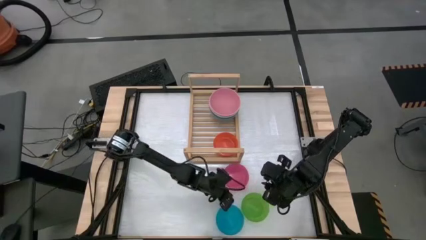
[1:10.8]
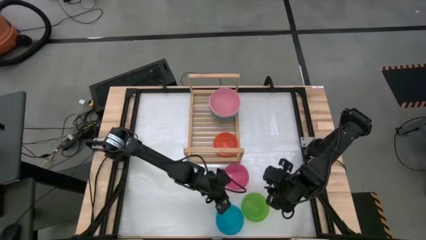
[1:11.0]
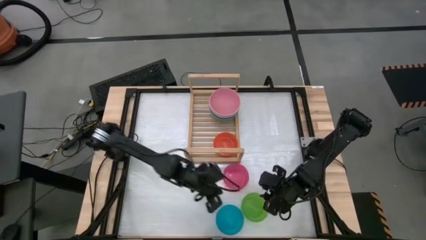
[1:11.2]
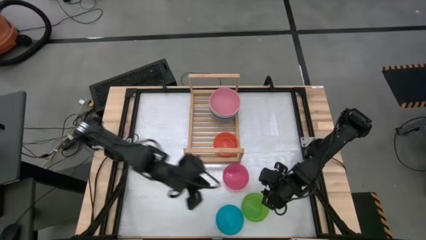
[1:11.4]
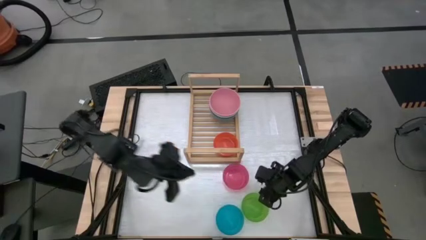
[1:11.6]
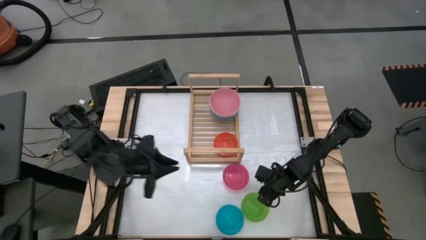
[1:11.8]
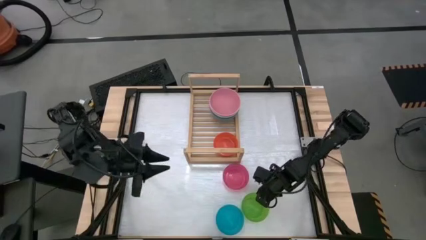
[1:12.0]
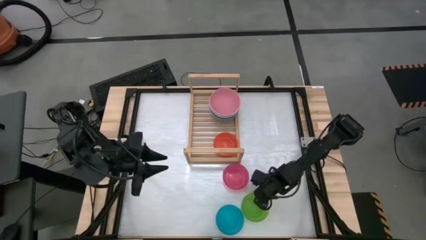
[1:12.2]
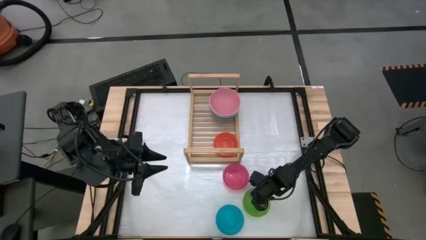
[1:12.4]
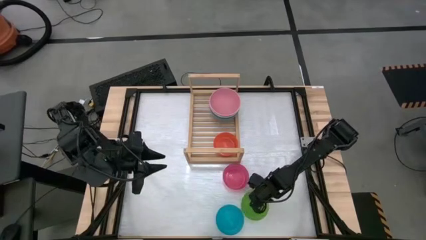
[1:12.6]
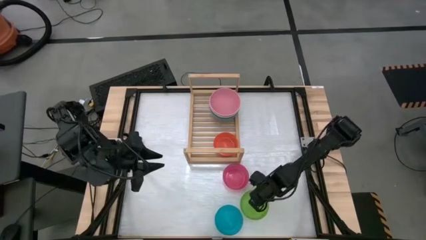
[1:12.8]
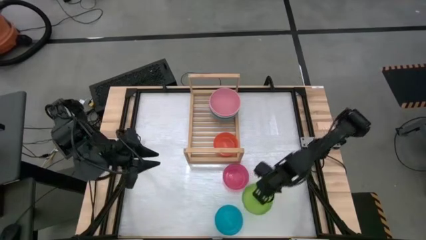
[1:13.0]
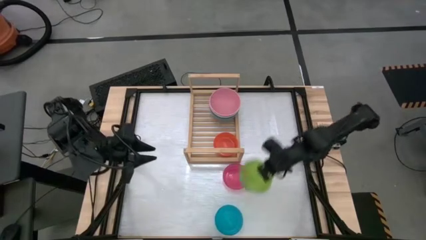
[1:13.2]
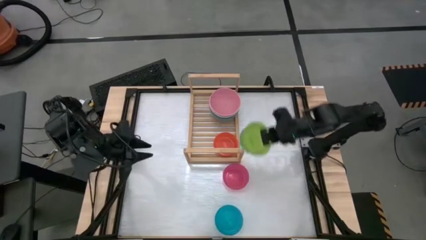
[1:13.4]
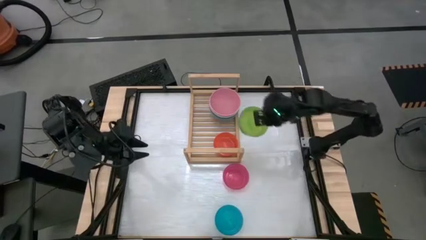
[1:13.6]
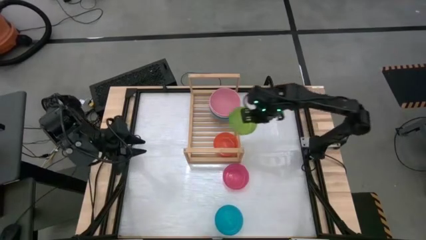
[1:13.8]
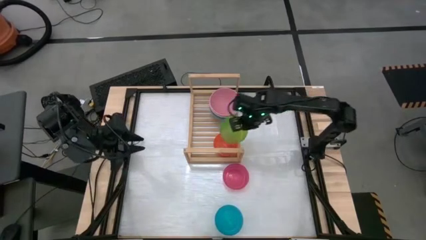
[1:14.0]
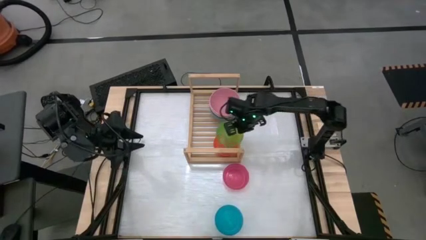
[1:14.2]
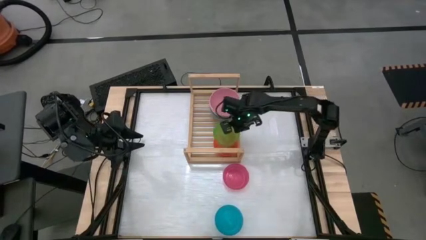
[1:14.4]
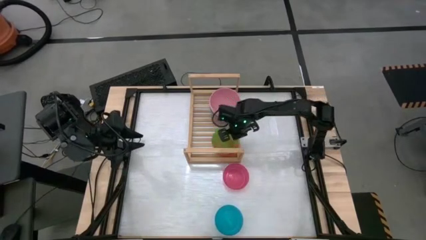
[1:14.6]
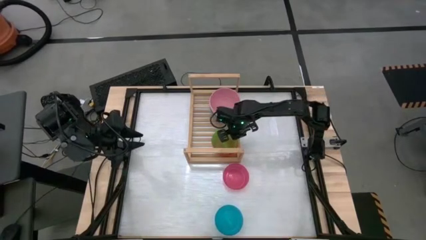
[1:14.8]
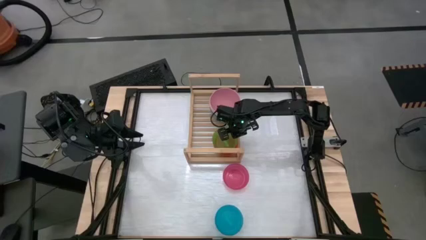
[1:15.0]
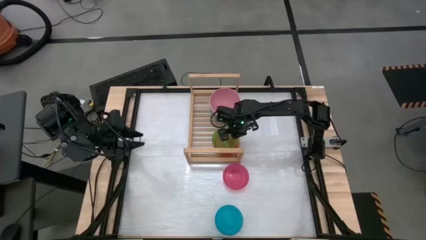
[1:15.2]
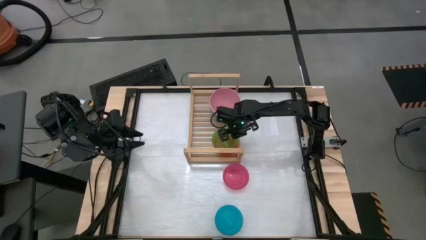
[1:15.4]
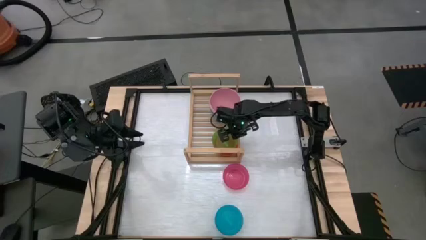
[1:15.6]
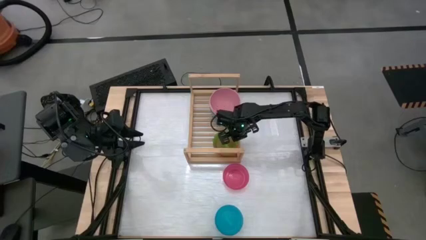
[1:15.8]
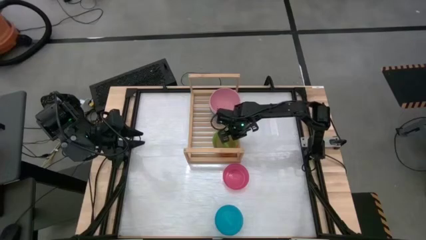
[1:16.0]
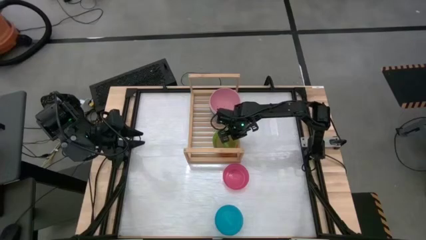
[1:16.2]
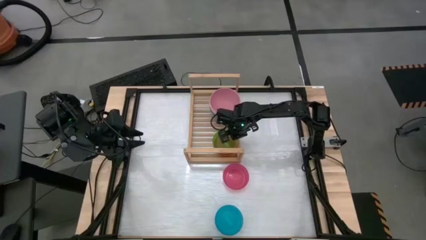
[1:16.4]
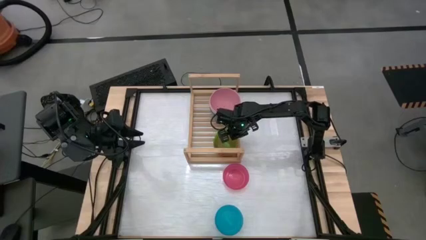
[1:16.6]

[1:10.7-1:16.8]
Task: Place and stack bowls onto a shelf
Stack the green bowl on the orange bowl on the shelf

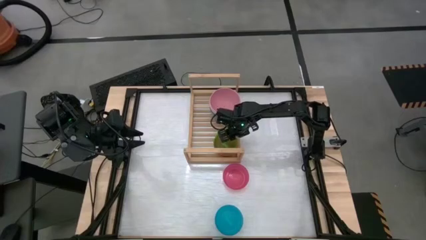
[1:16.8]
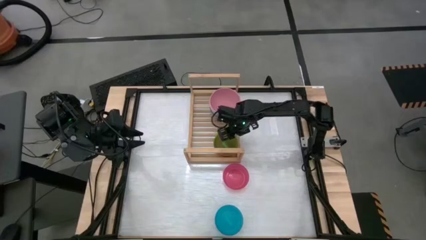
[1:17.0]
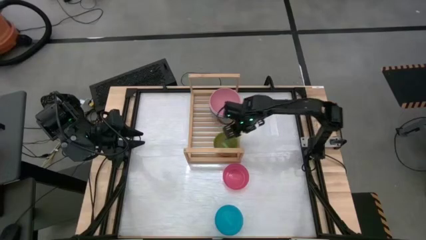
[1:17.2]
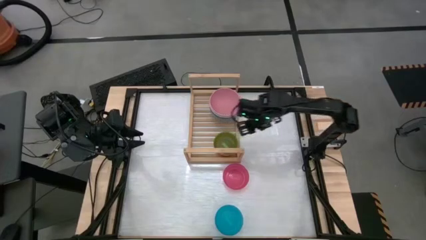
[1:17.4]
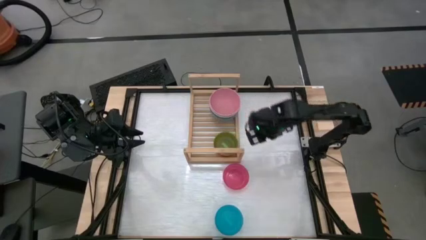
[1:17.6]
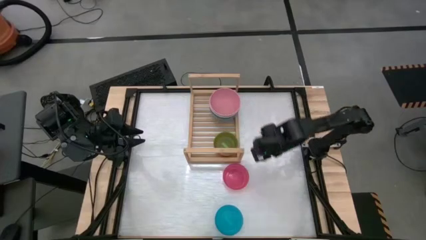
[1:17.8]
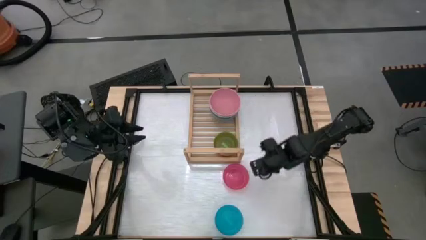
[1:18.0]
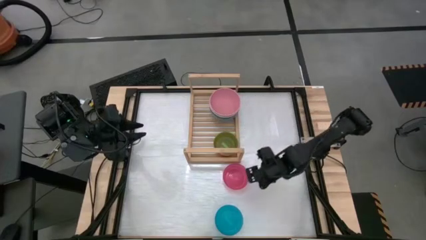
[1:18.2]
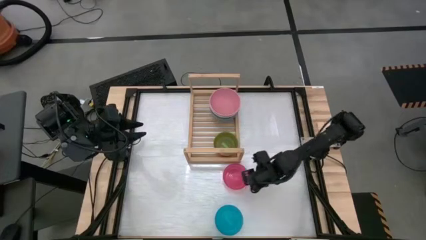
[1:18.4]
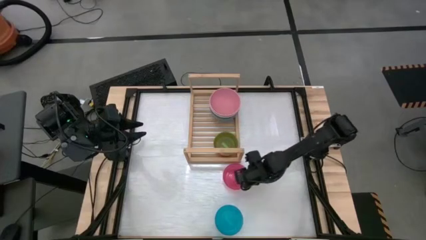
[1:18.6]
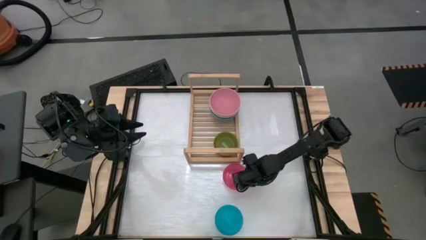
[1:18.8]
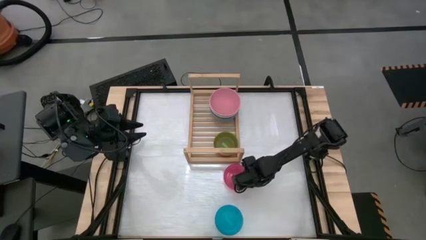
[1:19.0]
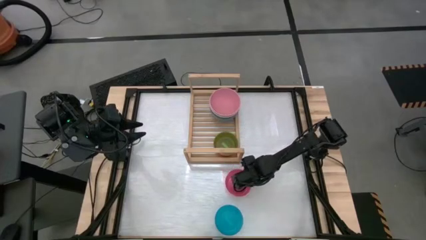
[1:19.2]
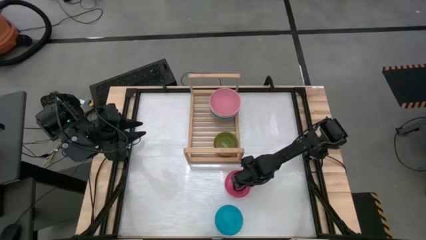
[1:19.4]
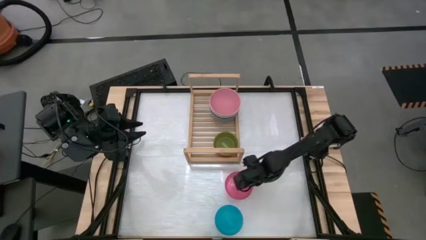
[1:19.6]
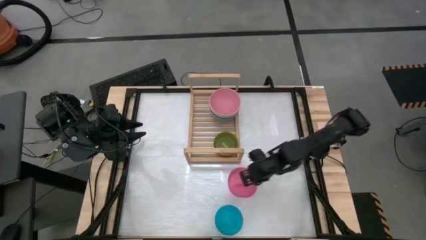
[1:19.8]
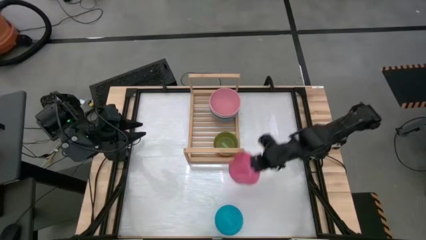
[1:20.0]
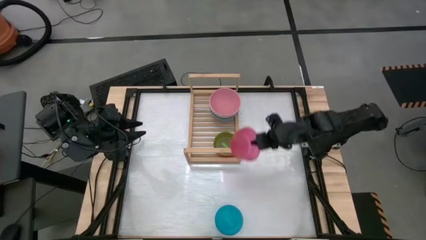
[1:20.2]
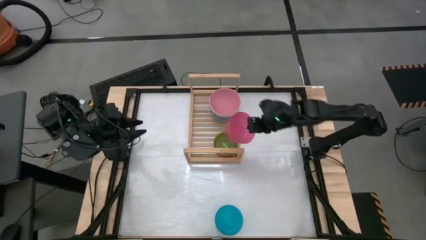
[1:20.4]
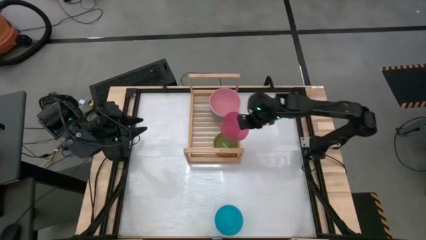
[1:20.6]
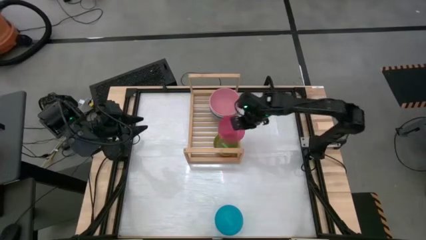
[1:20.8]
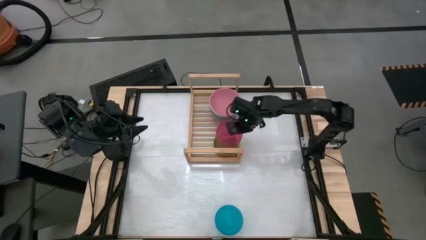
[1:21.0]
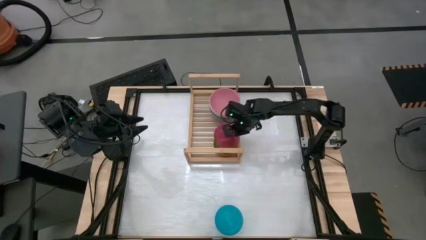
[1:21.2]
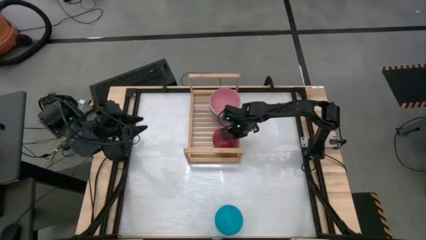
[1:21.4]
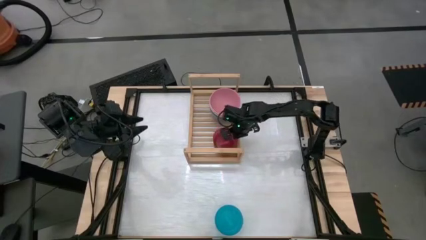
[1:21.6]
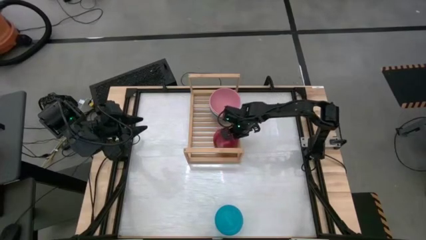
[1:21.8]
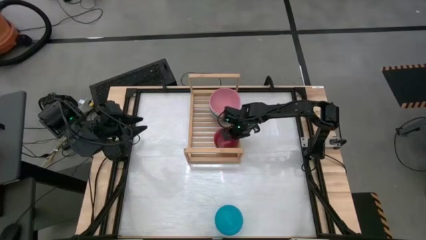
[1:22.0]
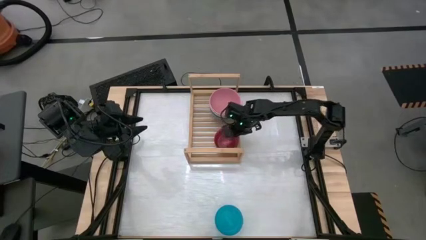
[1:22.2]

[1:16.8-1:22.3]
Stack the pink bowl on the green bowl on the shelf

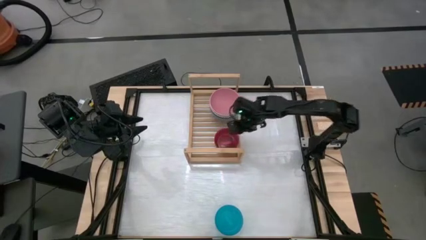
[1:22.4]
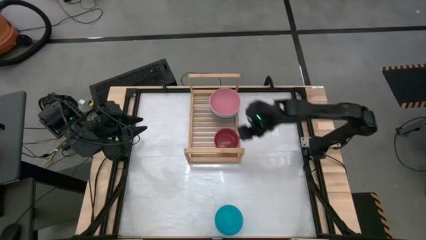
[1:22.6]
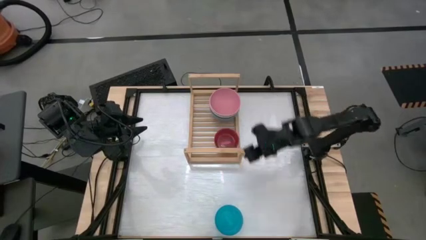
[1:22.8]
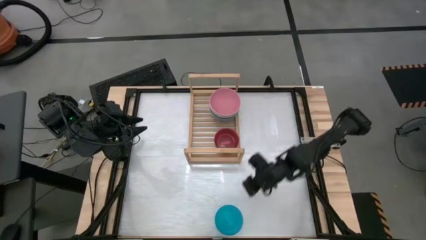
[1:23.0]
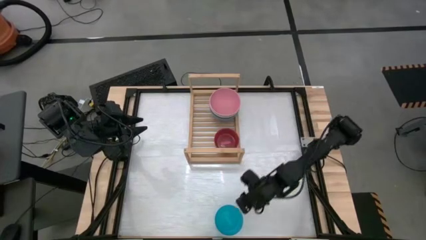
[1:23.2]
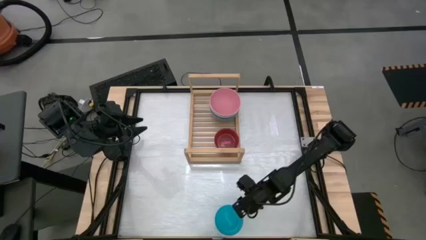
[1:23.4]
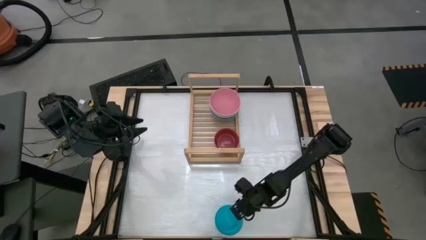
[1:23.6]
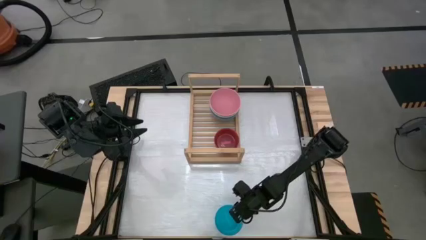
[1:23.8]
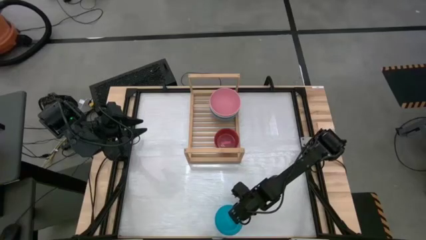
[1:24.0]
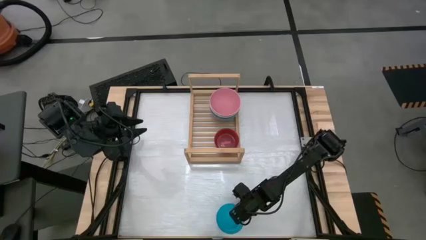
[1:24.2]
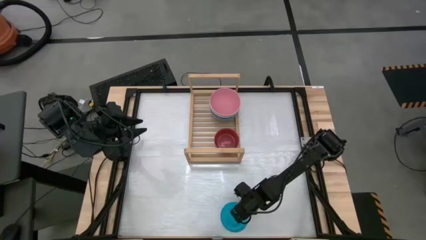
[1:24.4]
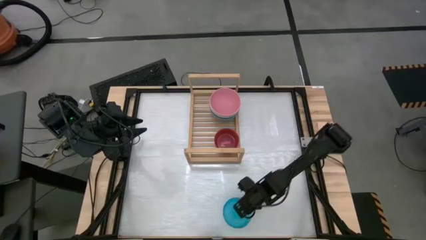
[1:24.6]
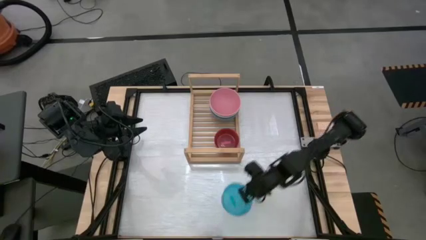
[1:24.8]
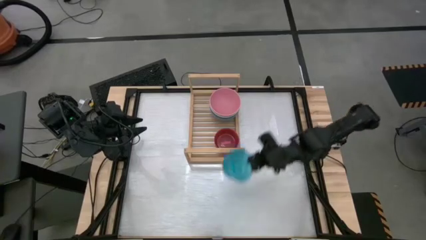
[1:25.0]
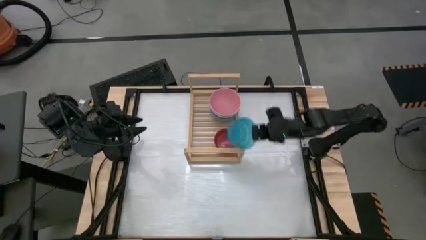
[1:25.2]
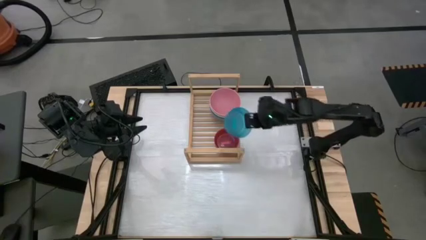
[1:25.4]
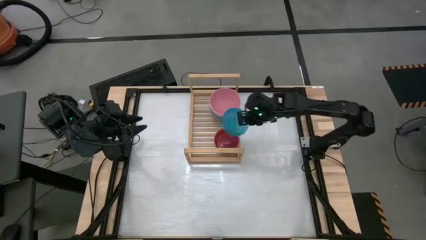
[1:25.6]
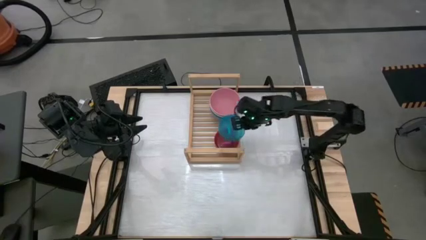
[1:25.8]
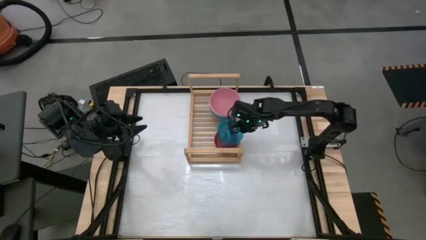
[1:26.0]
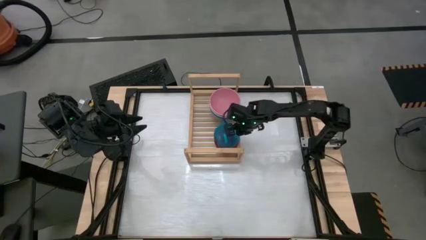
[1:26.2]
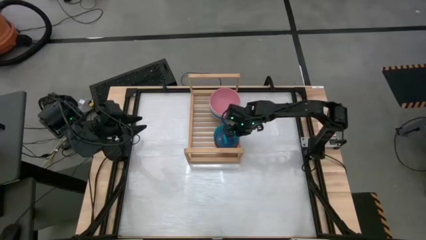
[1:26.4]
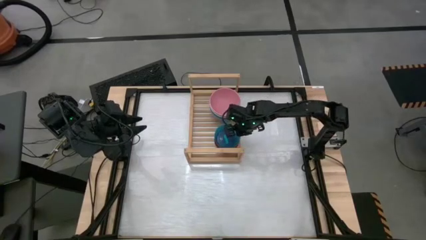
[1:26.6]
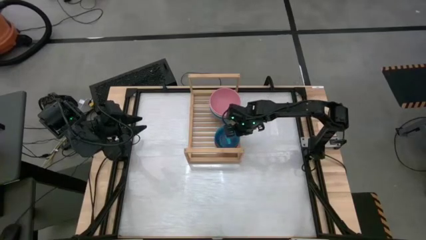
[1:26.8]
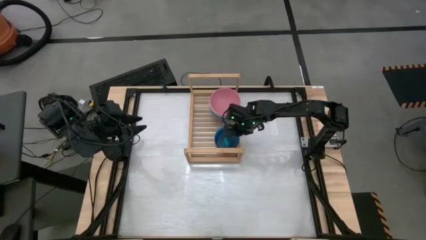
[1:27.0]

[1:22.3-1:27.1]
Stack the blue bowl on the pink bowl on the shelf
